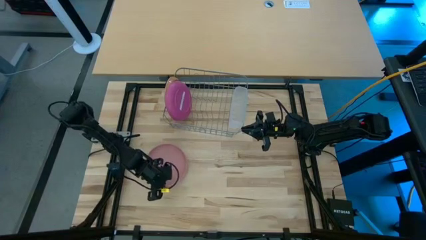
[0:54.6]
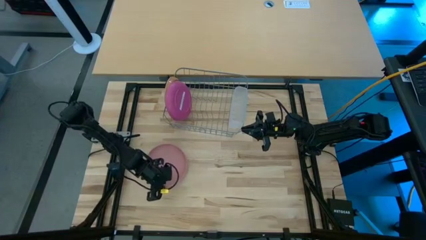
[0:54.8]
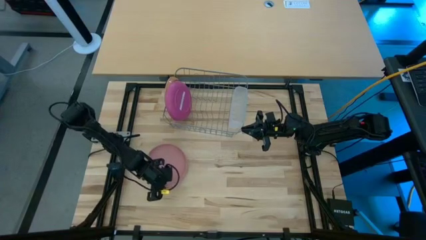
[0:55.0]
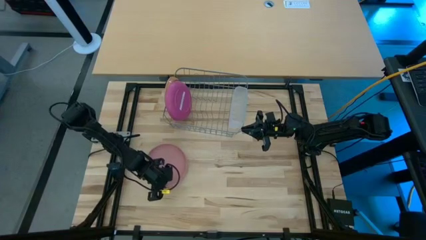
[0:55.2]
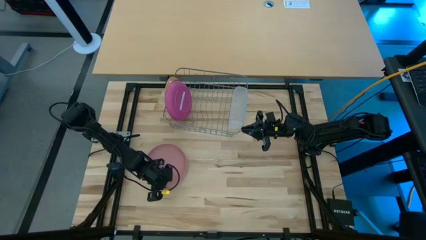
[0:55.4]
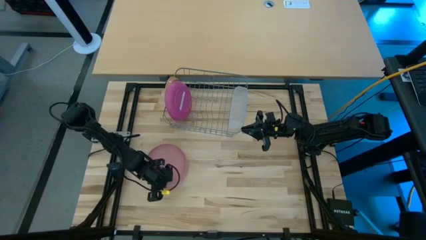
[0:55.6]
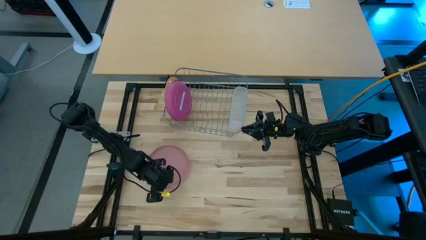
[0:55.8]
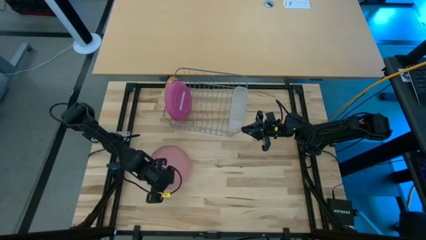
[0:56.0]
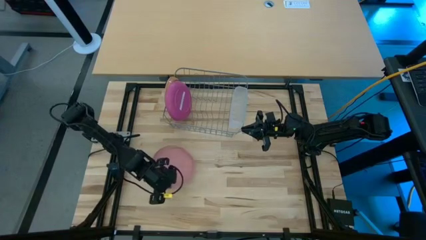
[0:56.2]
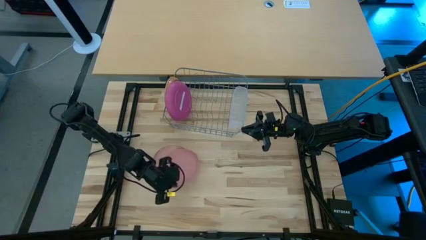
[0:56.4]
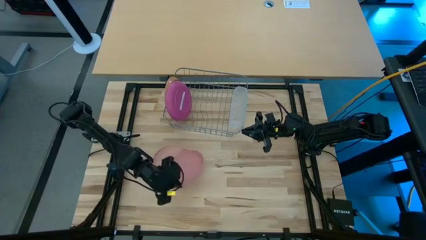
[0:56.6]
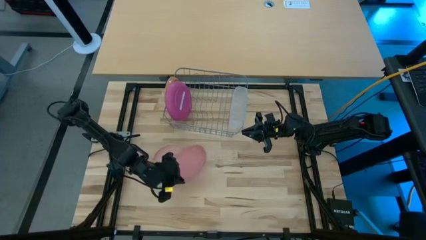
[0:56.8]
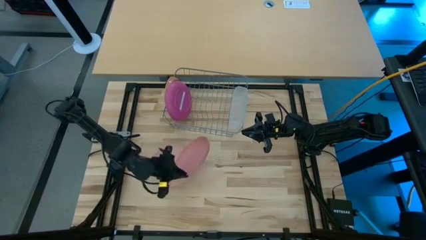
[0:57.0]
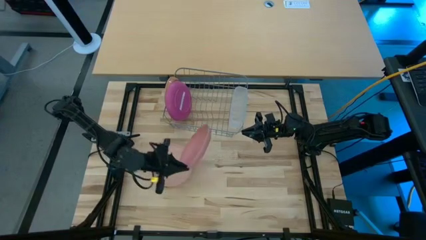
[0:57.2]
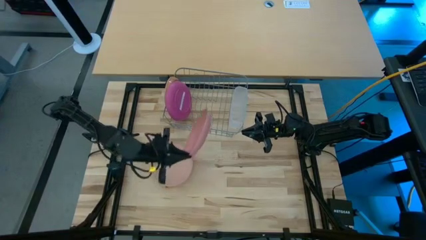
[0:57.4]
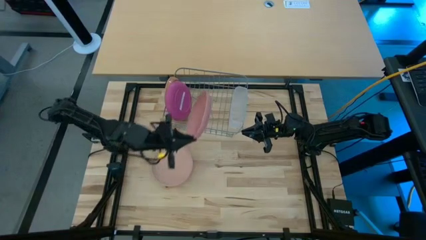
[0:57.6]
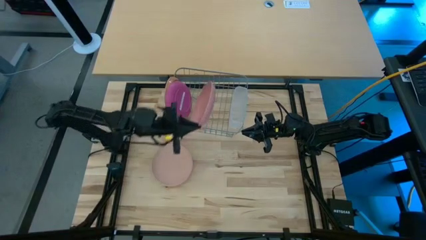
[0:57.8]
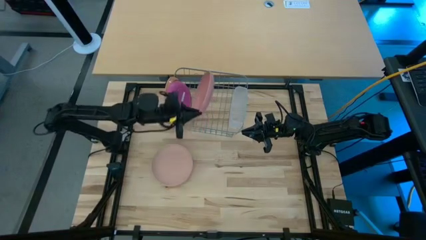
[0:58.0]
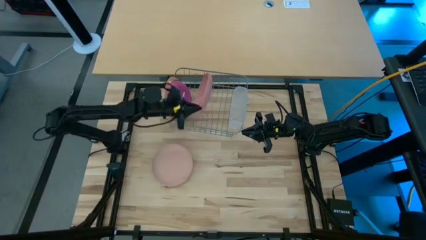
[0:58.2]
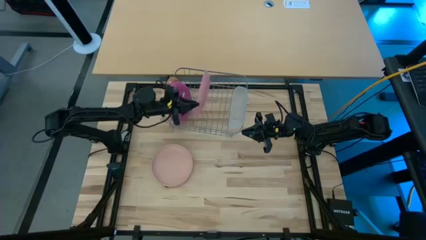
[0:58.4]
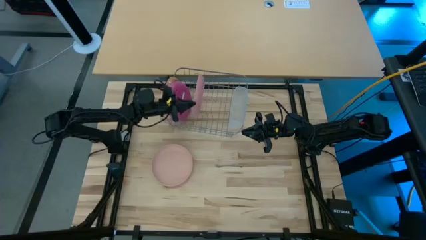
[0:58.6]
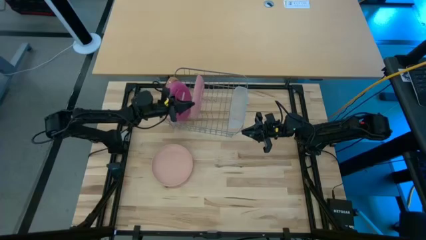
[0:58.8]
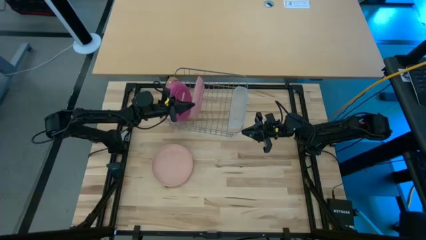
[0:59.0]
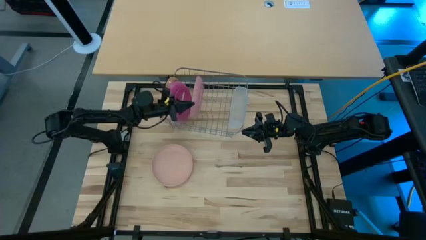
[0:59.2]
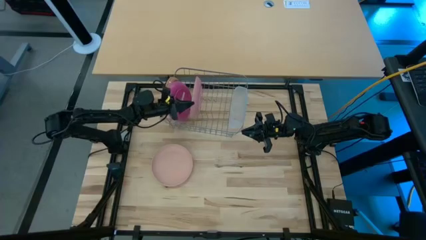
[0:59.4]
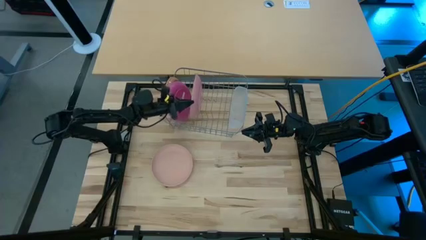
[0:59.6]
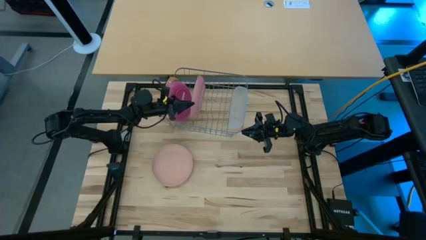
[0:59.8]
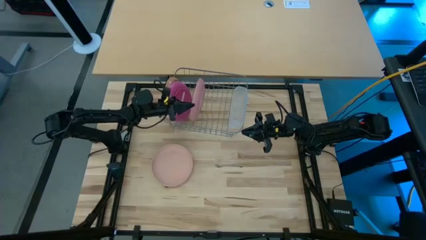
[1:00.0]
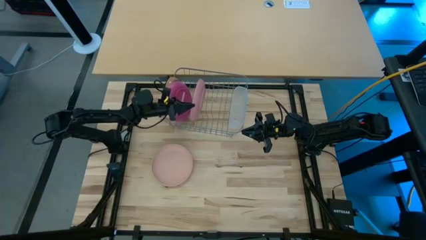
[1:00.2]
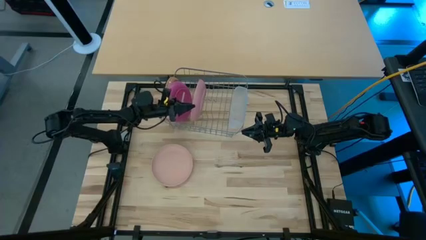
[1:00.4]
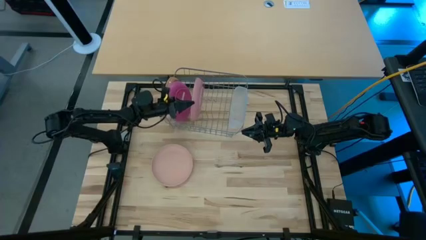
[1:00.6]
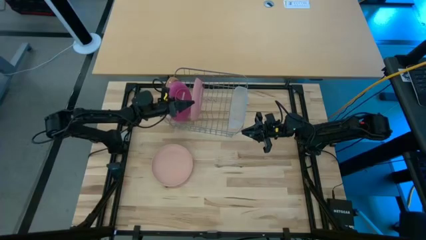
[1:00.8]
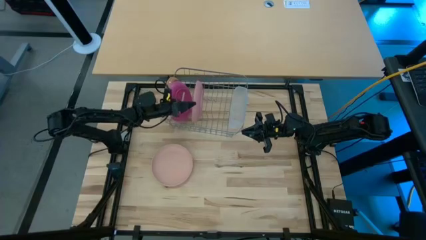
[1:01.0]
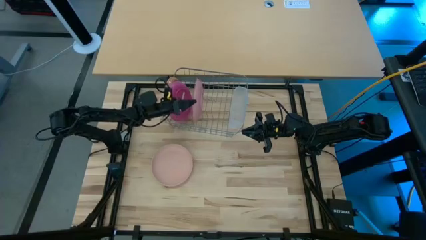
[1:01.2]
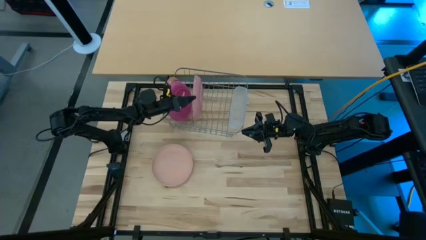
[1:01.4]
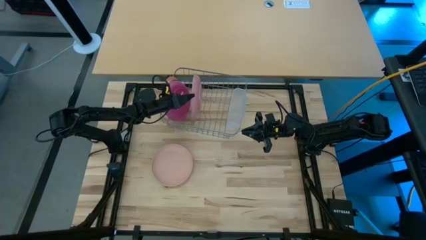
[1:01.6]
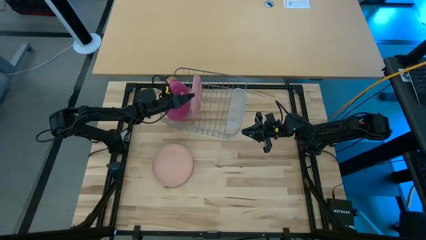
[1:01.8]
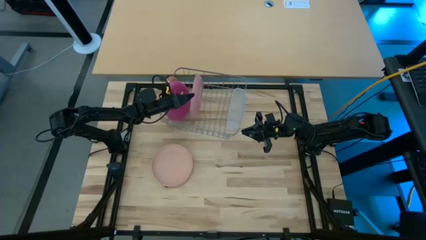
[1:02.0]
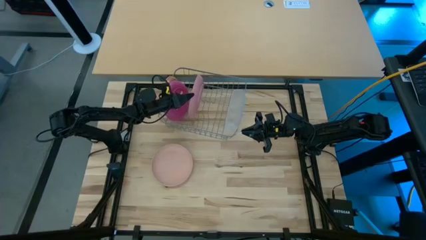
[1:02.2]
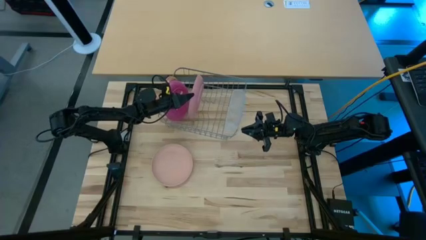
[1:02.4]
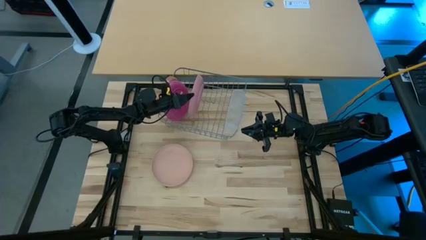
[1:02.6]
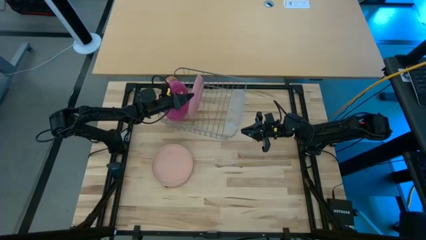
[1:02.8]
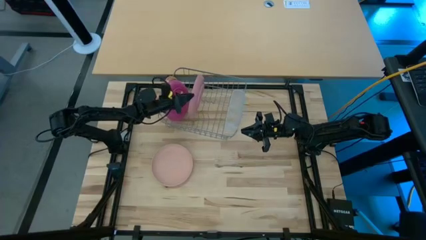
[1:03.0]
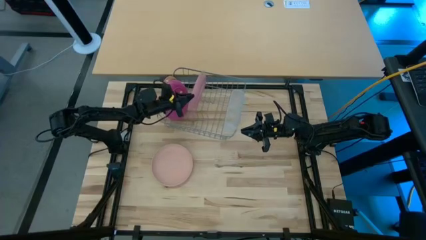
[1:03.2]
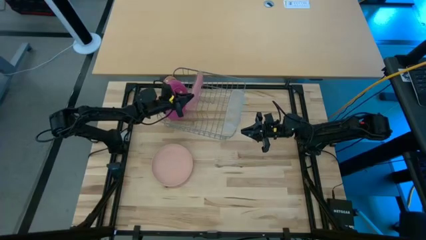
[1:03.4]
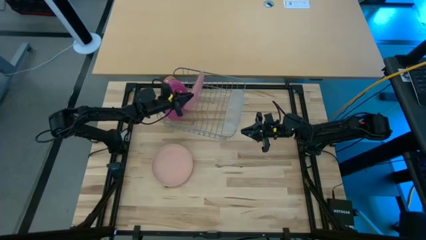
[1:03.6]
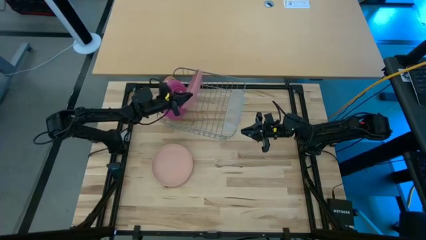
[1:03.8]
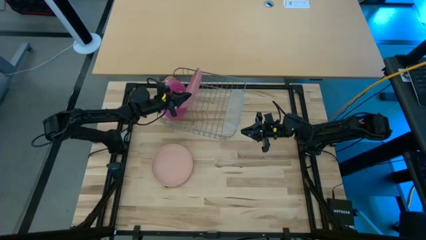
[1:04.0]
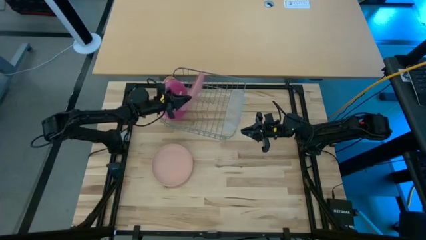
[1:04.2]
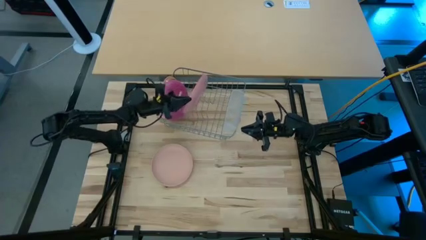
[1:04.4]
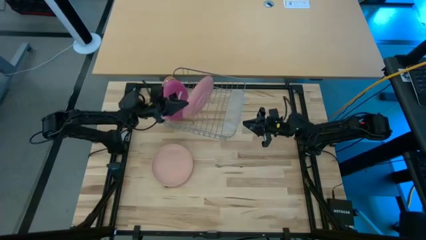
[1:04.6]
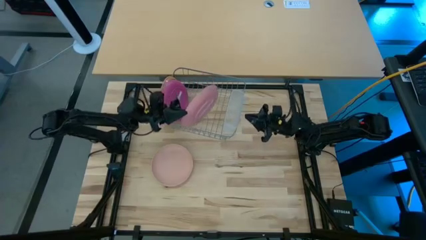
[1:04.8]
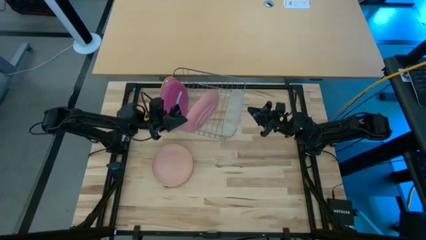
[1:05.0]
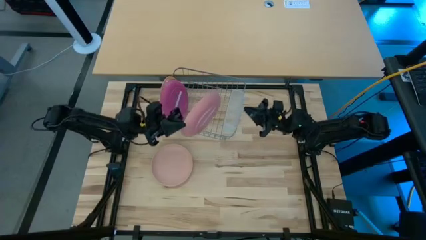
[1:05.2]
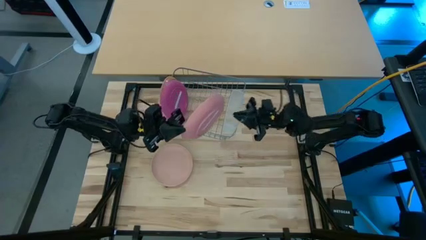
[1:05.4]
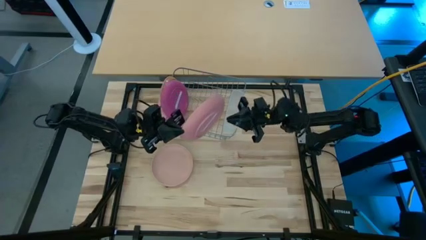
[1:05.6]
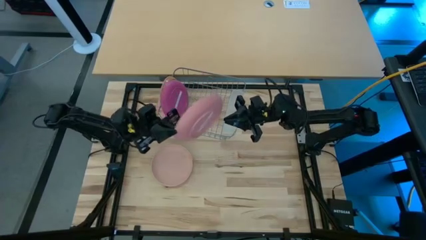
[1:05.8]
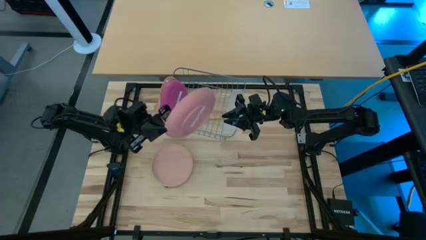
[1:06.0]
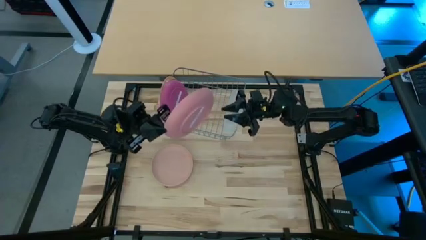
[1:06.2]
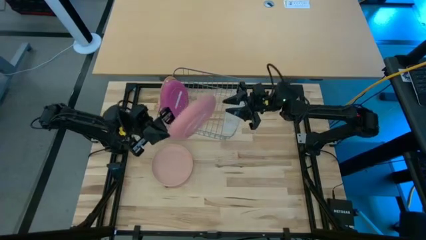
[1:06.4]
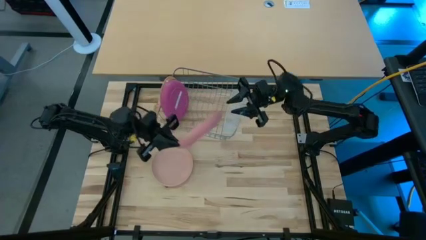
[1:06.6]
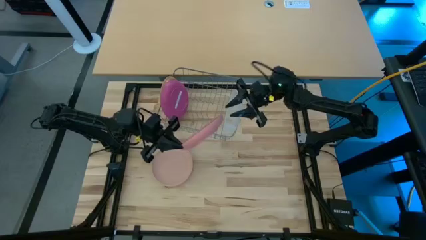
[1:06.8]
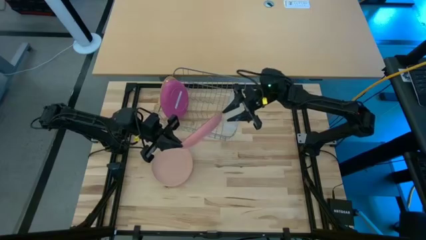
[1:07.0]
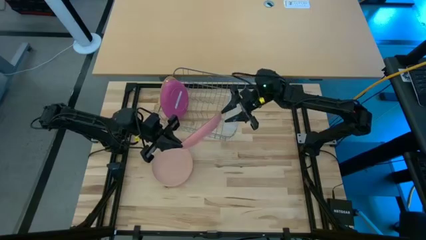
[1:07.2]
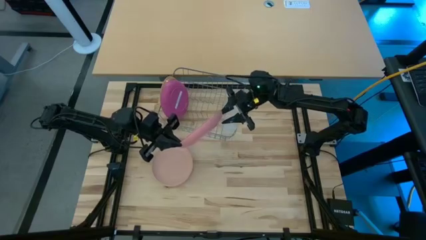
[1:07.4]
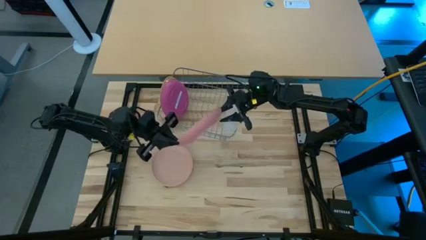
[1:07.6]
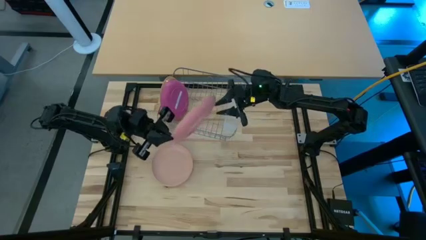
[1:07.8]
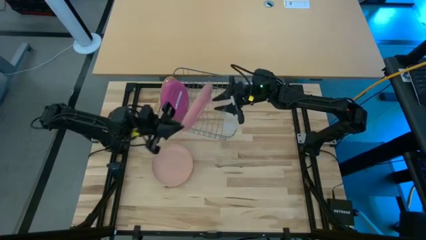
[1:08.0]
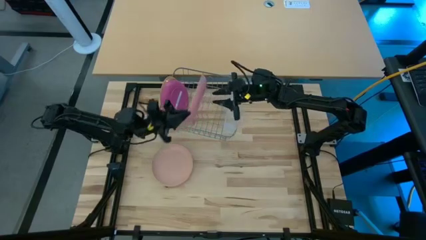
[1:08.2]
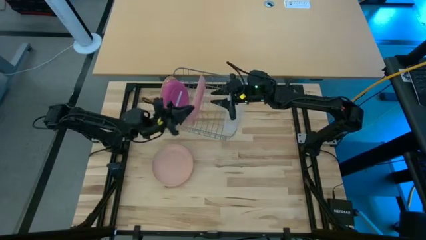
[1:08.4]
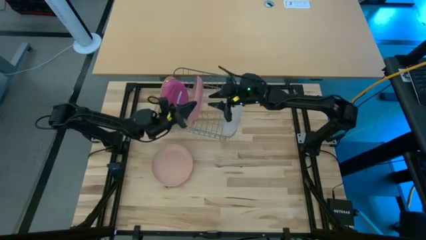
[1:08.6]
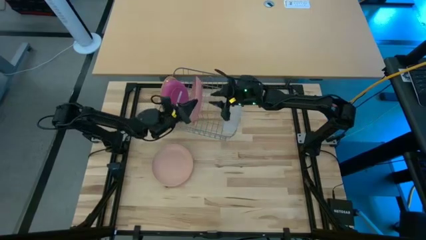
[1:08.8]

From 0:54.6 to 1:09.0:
Task: Sort dishes
Put the pink plate into the dish rack
